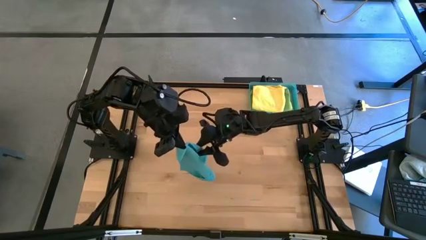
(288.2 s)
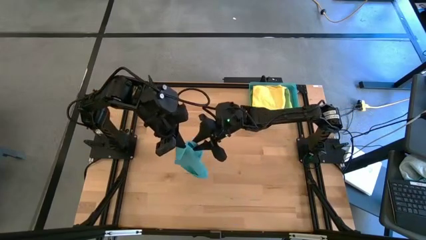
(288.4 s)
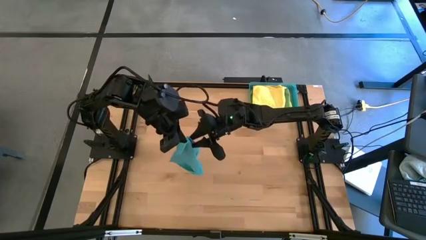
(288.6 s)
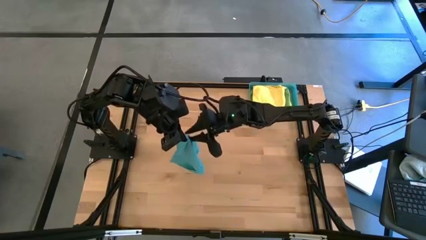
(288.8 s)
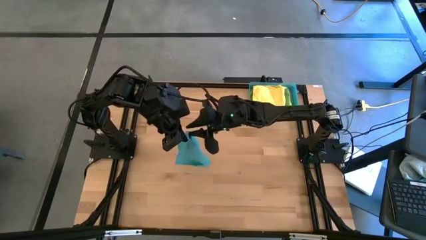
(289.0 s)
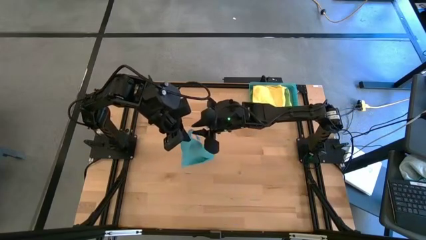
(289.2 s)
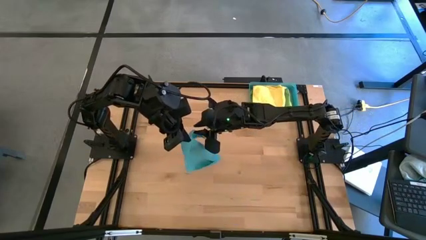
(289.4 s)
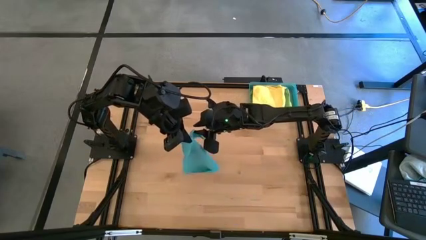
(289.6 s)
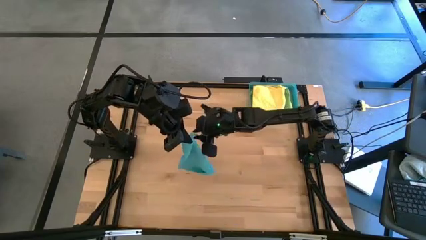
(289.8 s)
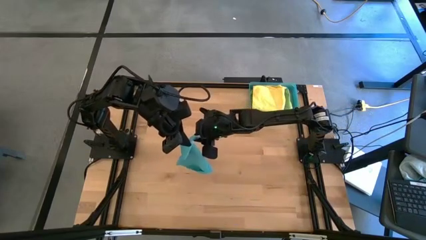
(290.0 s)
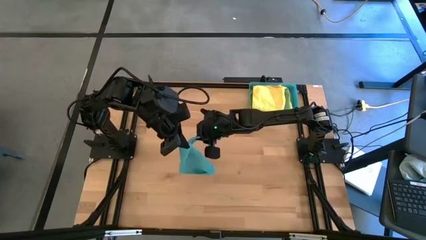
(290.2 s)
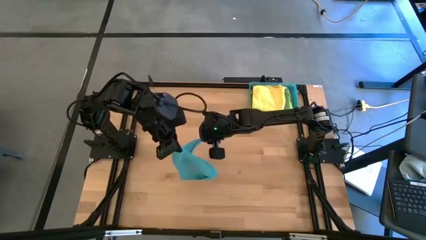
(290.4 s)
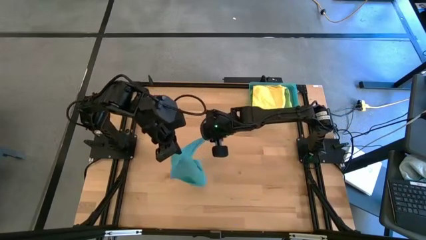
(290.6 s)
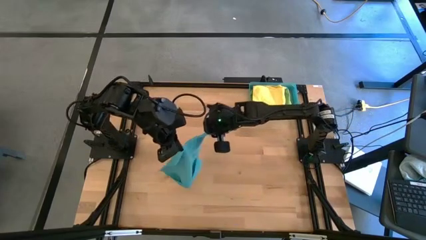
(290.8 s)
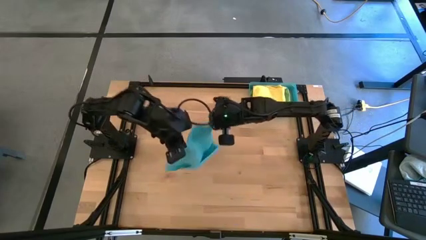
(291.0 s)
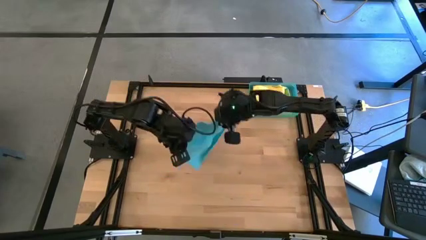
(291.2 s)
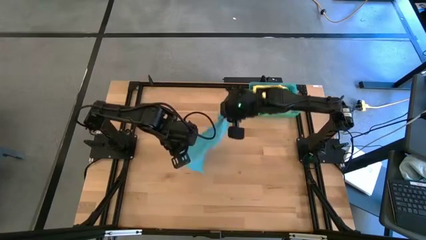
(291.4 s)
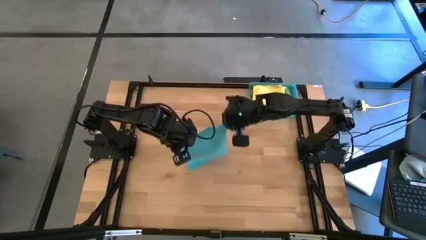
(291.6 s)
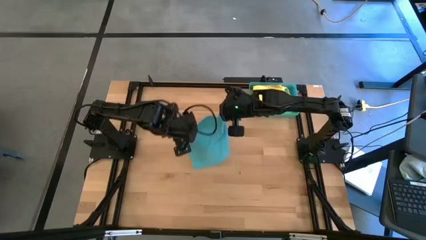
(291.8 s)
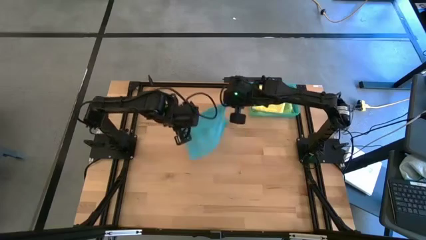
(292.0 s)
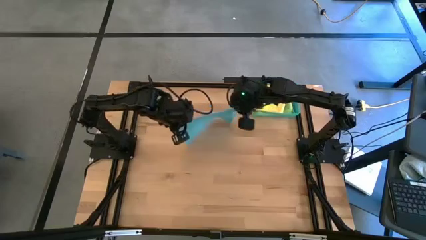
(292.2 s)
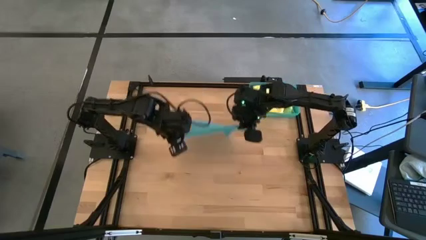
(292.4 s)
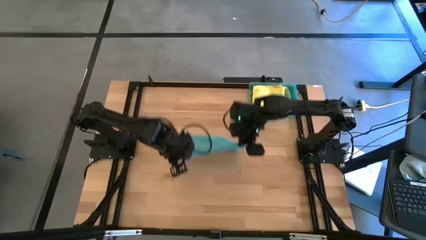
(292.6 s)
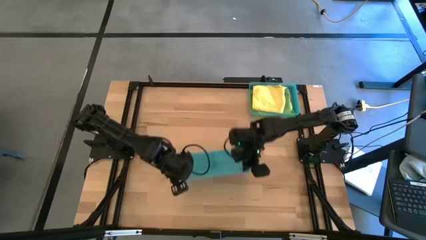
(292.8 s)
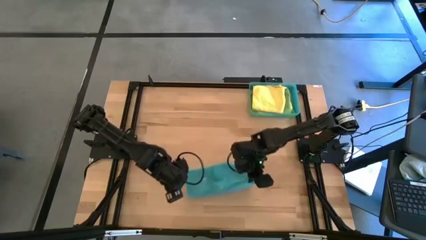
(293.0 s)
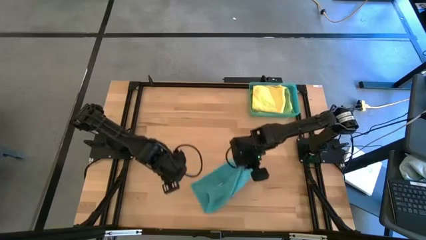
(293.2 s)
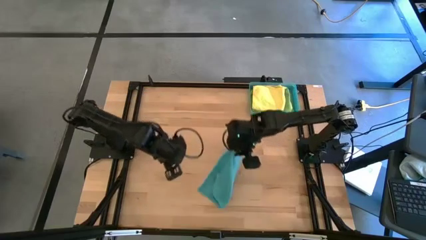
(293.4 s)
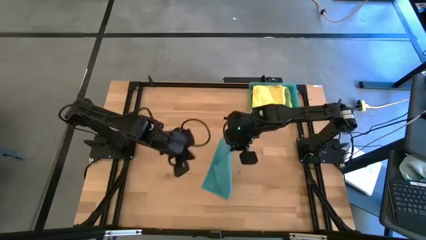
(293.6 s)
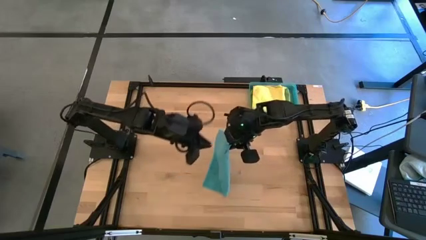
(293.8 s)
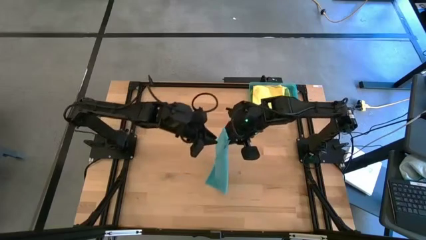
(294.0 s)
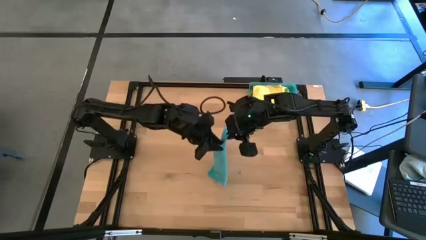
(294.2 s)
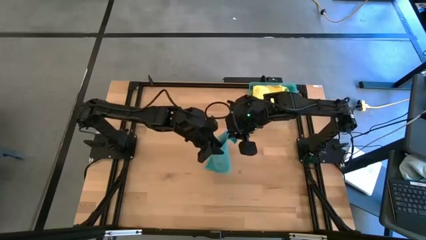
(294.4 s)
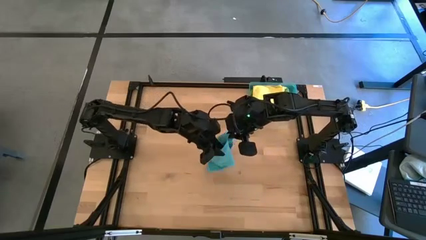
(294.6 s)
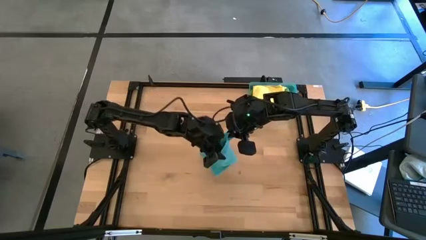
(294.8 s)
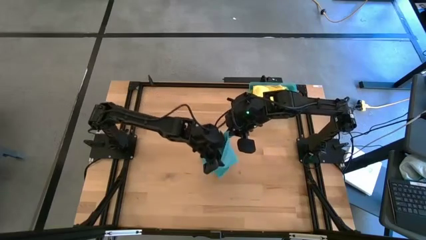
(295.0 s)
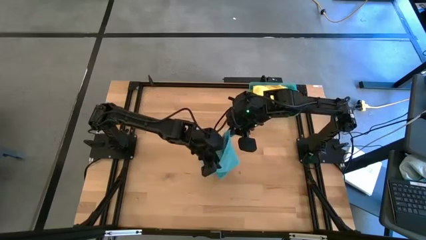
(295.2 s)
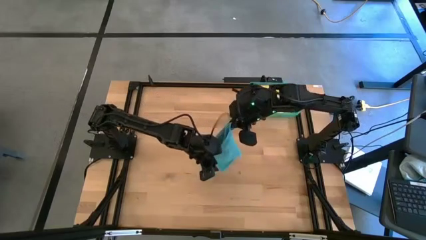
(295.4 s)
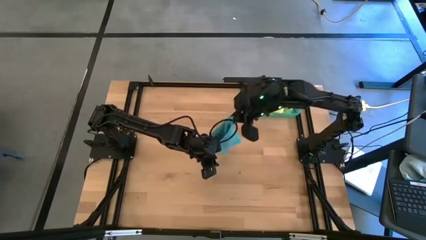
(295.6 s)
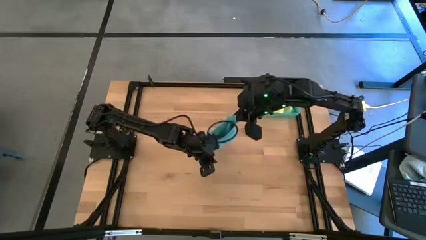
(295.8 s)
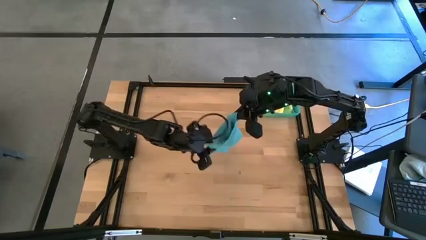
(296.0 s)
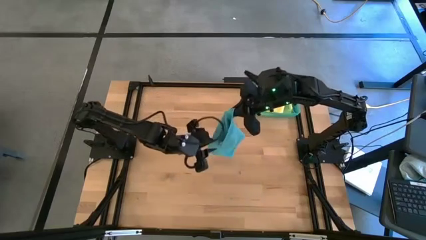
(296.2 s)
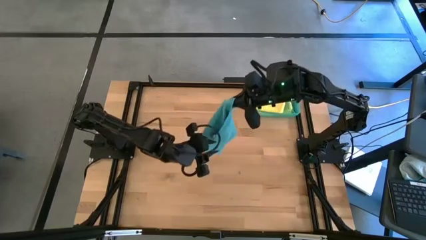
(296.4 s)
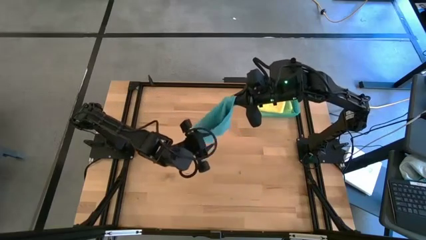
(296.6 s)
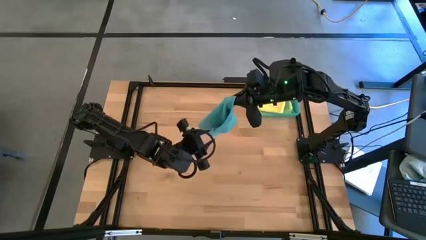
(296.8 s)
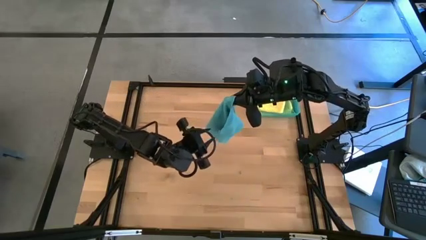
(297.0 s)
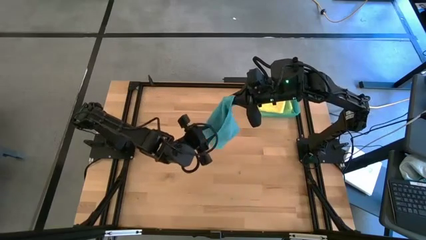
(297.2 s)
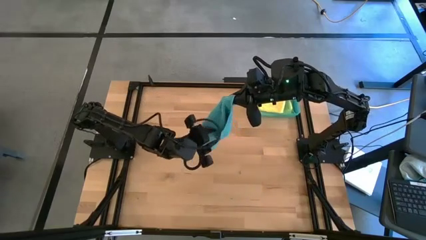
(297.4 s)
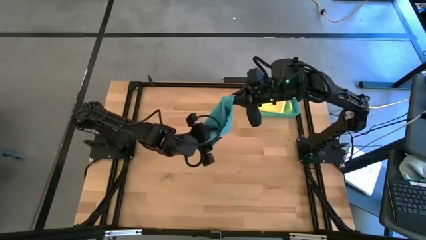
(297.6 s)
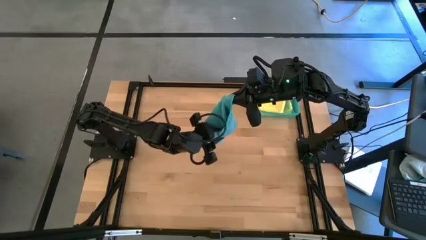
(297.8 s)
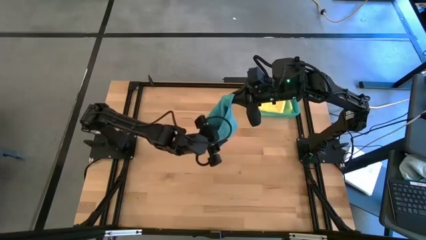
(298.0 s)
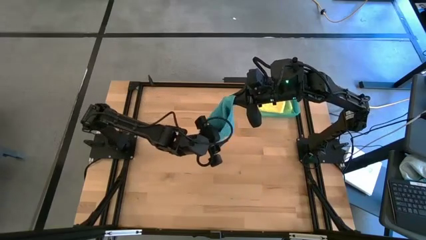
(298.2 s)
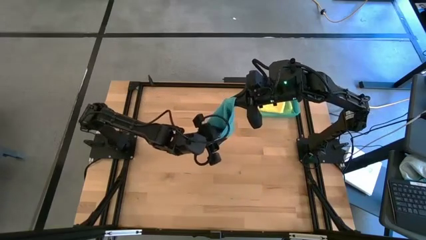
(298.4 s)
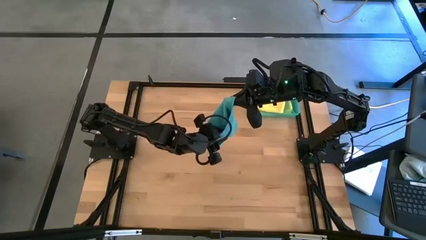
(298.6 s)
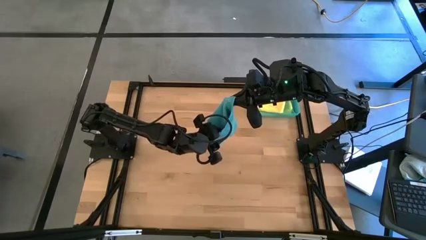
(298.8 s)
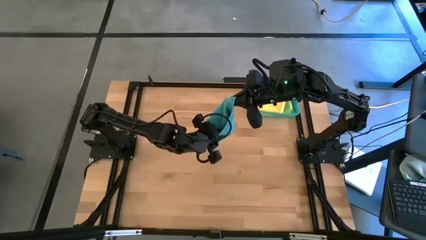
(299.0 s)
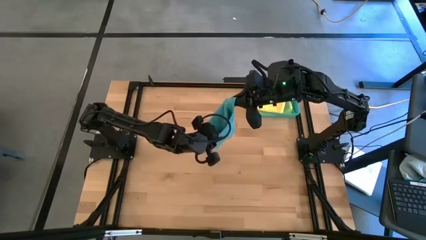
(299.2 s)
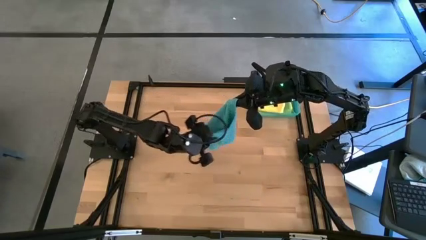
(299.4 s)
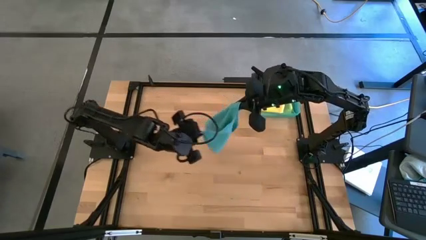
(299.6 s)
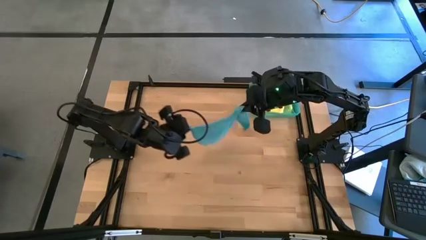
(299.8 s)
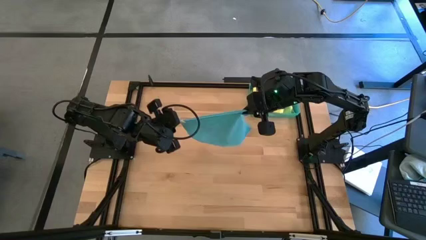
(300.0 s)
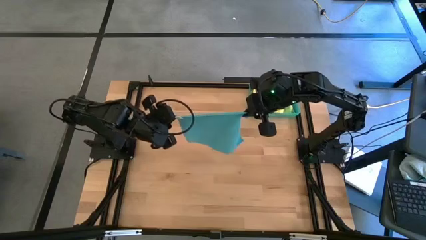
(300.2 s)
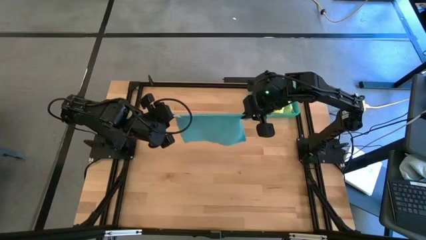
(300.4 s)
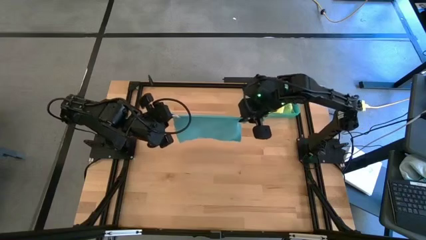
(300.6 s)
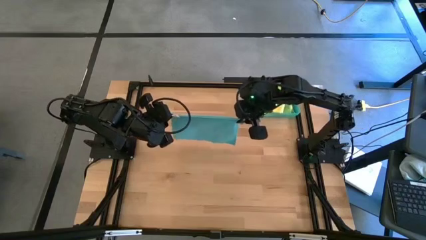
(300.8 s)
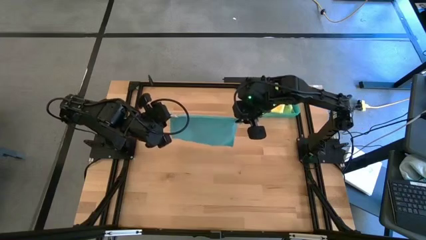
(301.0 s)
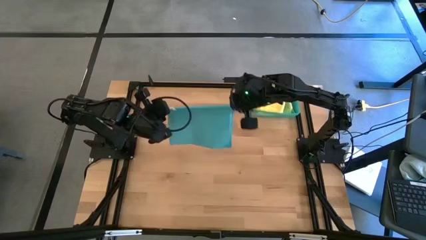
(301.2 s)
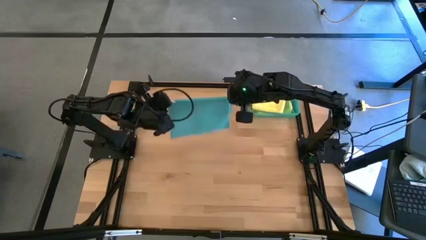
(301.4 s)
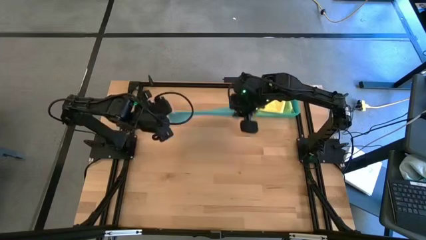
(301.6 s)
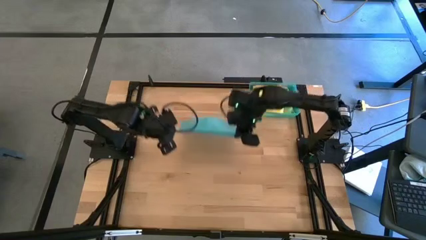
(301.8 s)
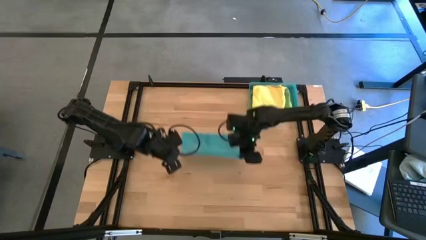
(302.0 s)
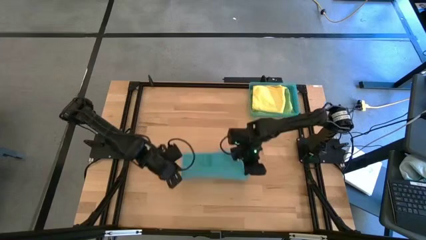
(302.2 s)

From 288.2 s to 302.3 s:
Task: Fold microfiber towels
Fold the blue microfiber cloth
